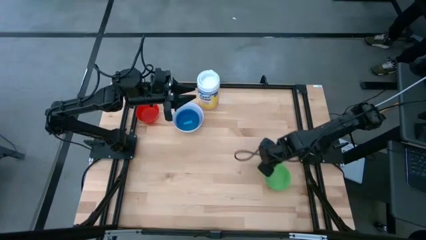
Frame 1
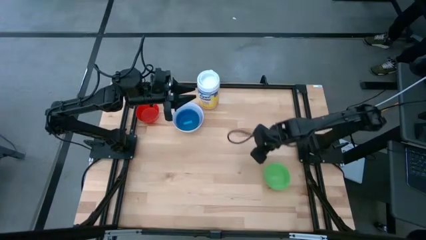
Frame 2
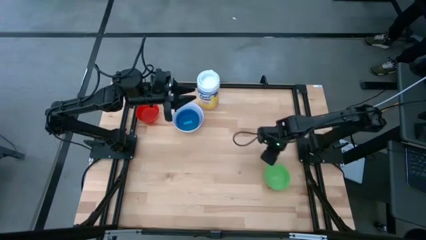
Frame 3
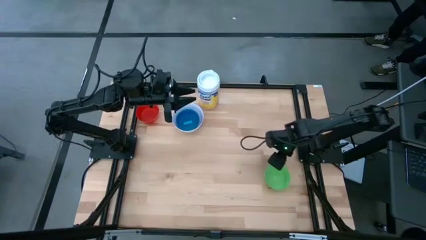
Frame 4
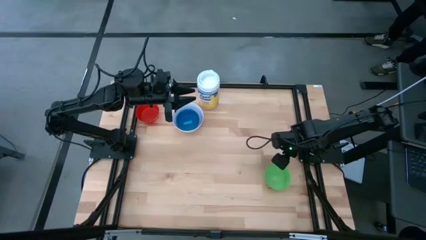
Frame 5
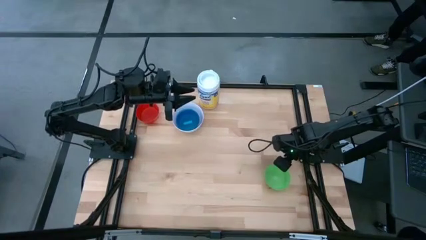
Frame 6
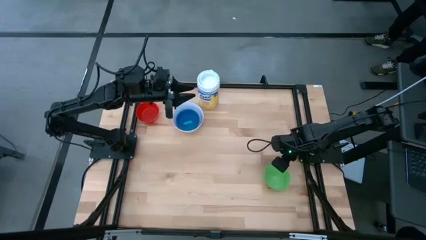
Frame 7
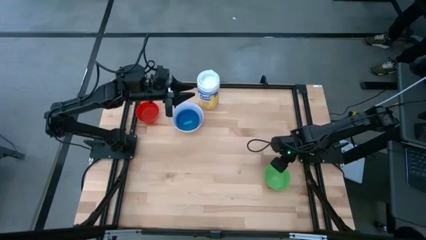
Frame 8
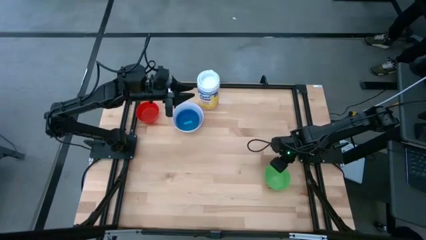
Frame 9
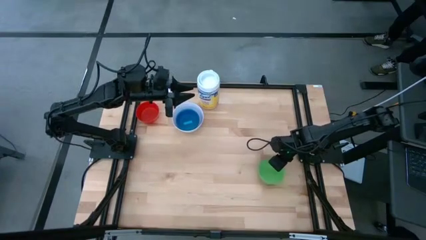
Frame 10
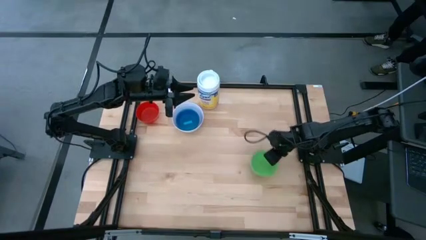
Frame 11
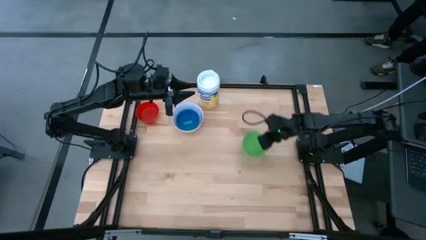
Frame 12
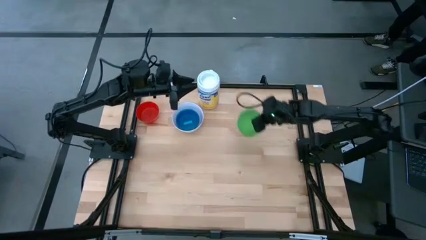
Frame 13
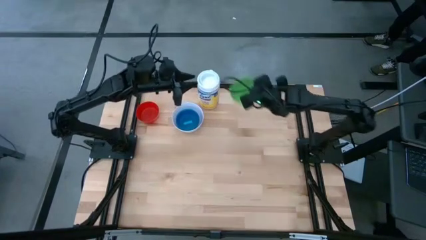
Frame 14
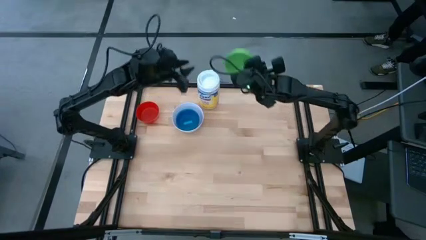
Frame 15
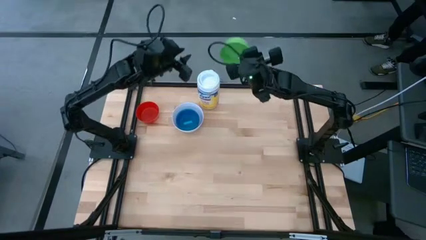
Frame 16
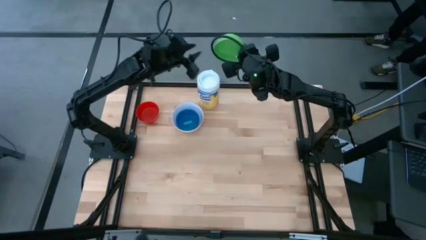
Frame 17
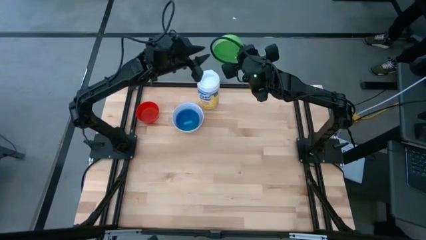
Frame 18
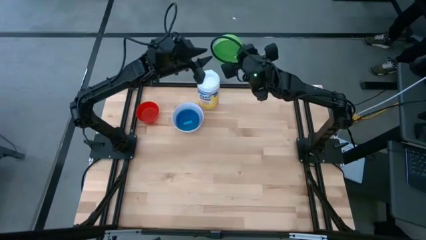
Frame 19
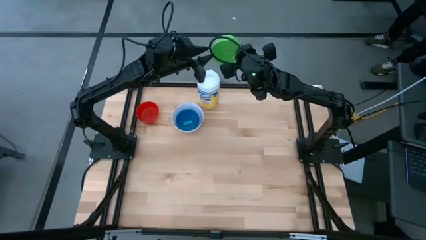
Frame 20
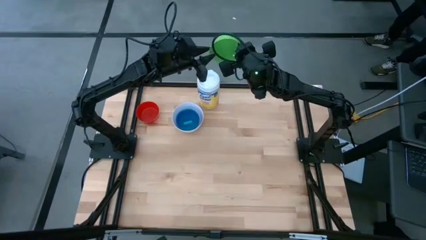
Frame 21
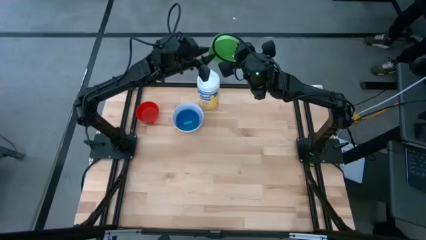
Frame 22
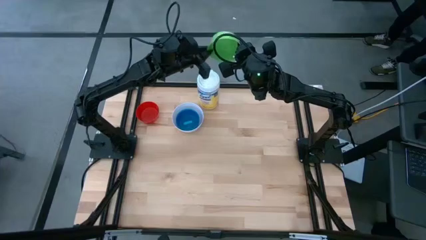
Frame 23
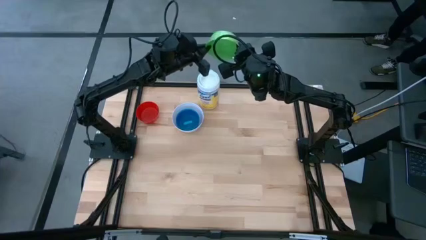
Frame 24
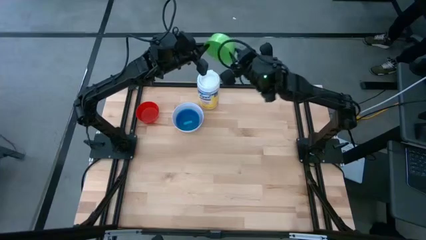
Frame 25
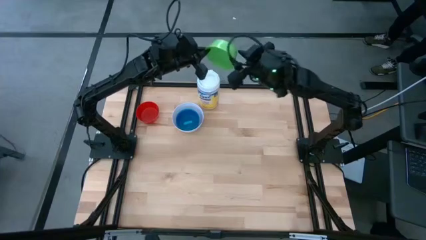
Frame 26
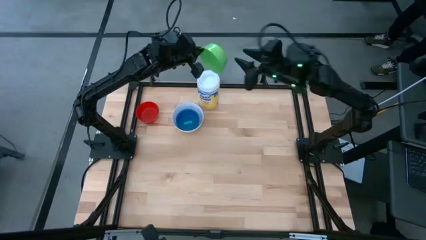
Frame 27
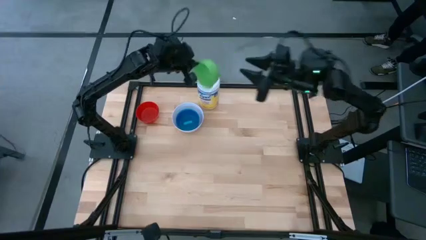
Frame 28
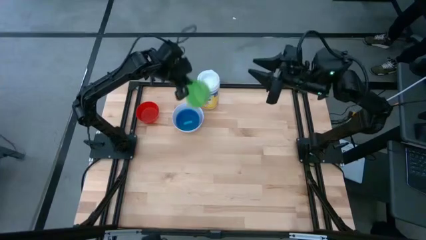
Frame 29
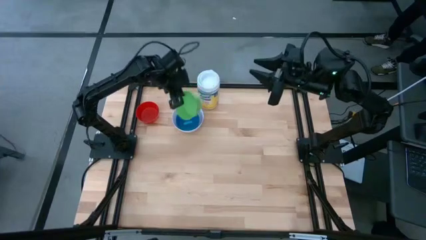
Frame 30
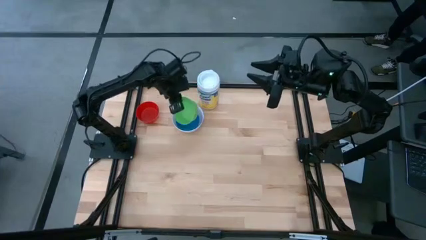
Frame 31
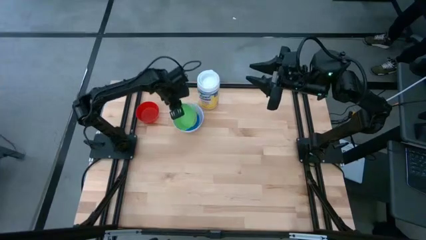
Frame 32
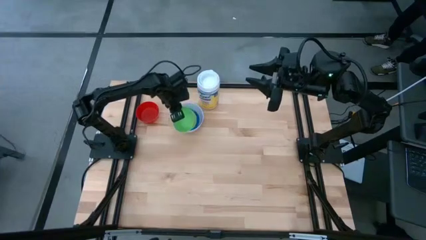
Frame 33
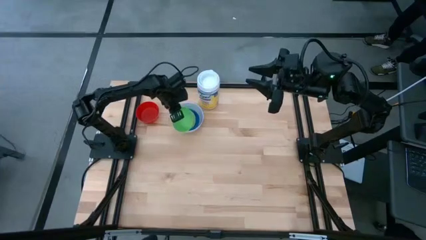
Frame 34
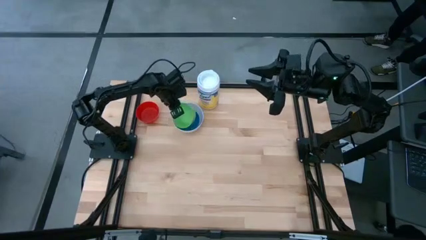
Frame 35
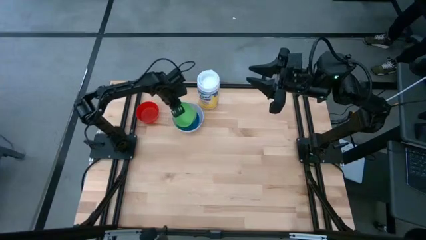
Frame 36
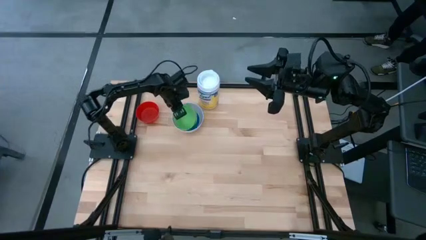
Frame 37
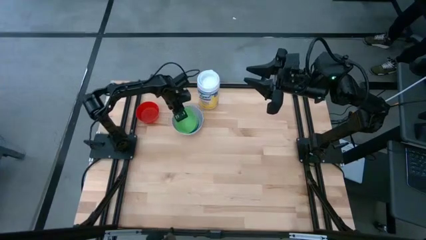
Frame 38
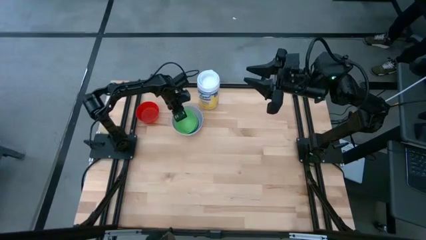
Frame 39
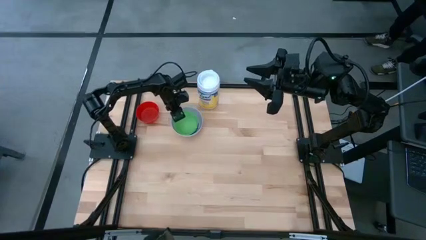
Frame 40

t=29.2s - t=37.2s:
Stack the green bowl on top of the light blue bowl

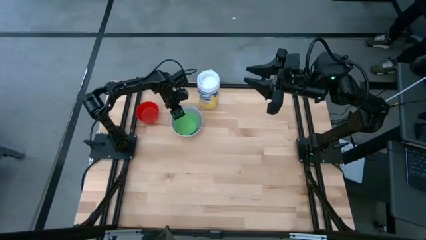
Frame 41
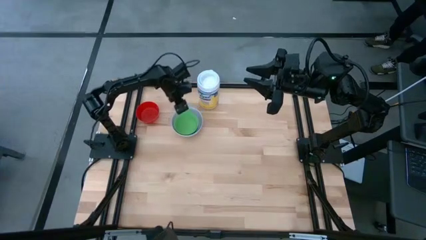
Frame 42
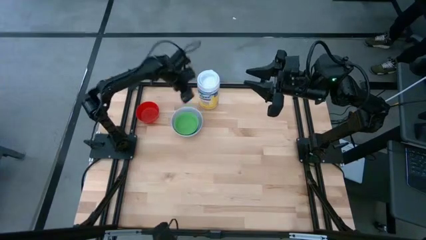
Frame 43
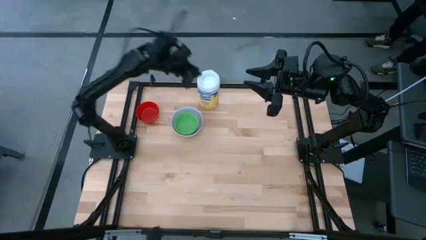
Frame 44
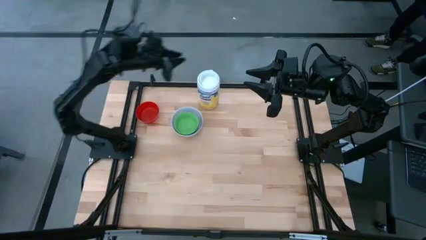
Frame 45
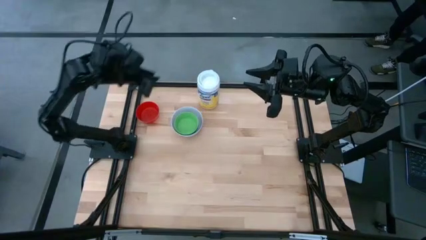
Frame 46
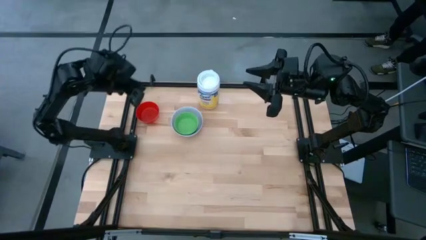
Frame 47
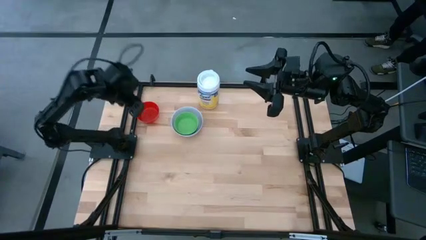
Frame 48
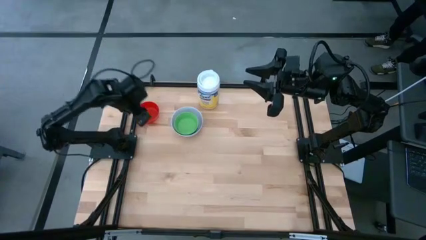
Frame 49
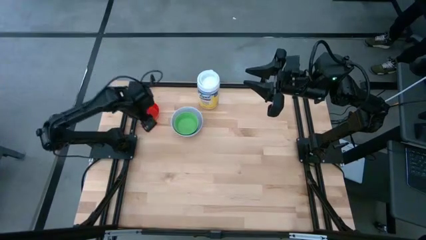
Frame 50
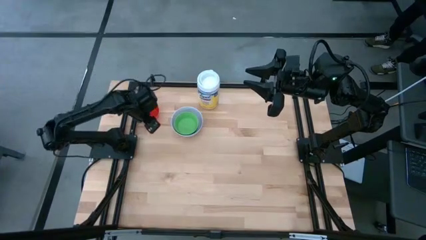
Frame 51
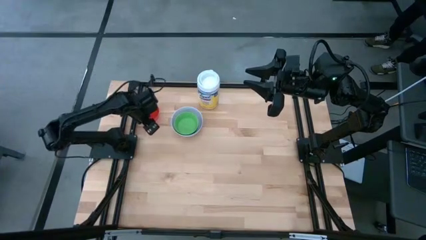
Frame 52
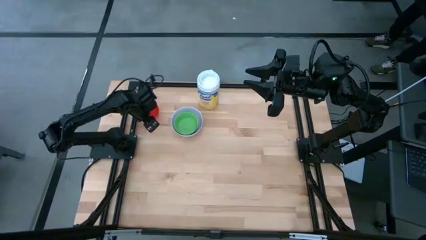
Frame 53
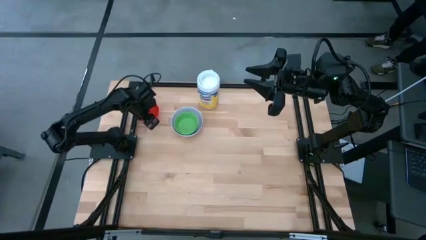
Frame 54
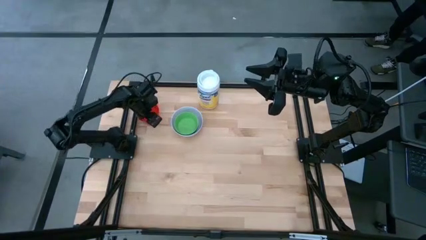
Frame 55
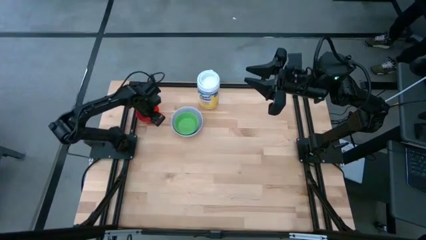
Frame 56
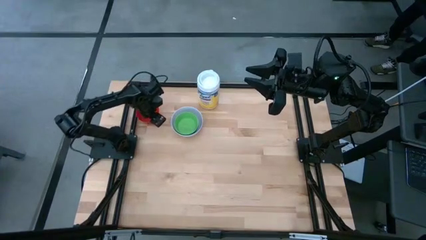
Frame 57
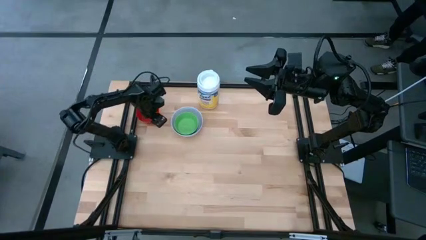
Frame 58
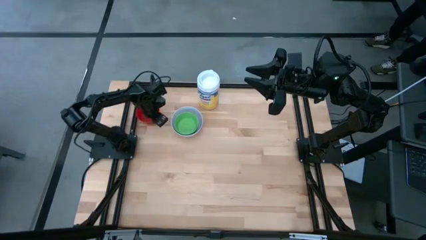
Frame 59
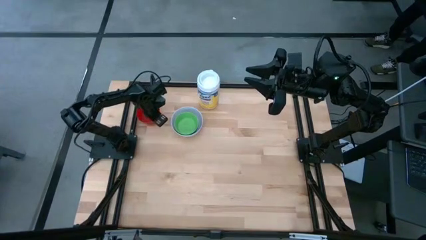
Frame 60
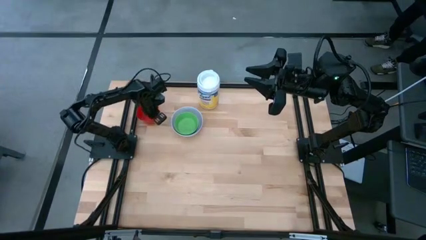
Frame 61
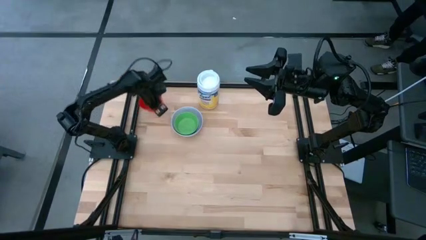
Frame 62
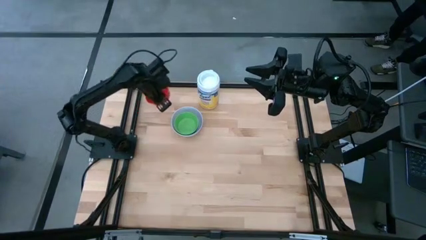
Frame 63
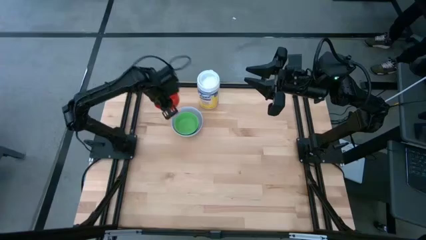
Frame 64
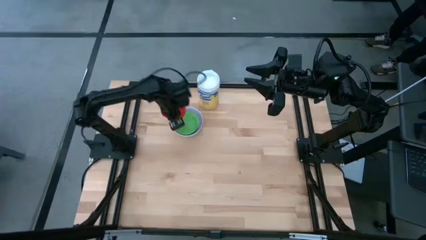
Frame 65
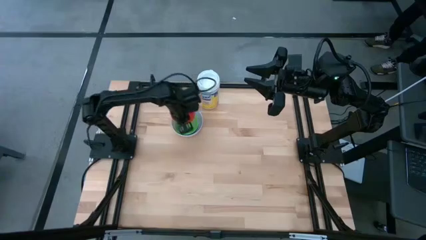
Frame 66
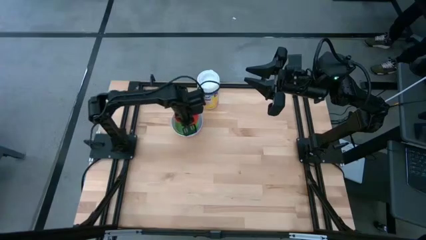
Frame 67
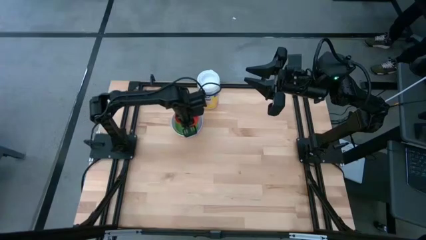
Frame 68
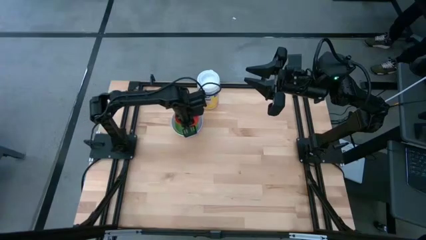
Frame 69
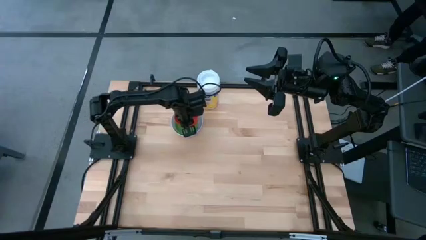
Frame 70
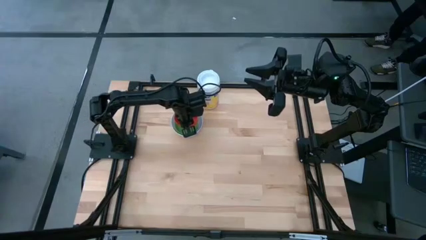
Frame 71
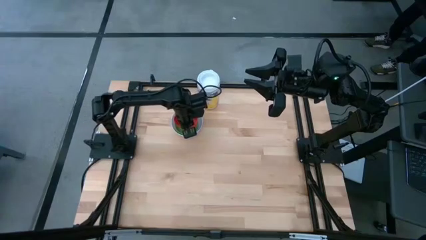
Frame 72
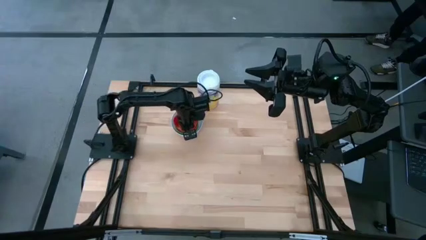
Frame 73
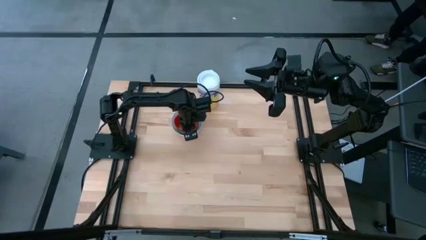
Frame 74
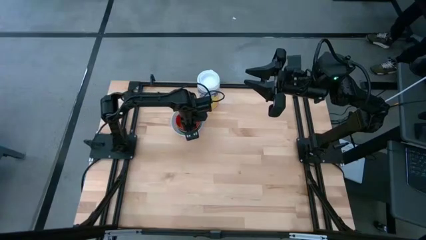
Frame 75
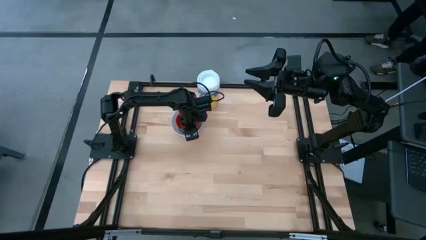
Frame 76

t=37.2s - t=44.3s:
Stack the red bowl on top of the green bowl
